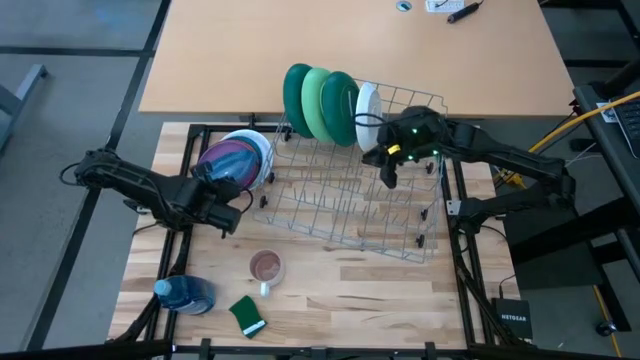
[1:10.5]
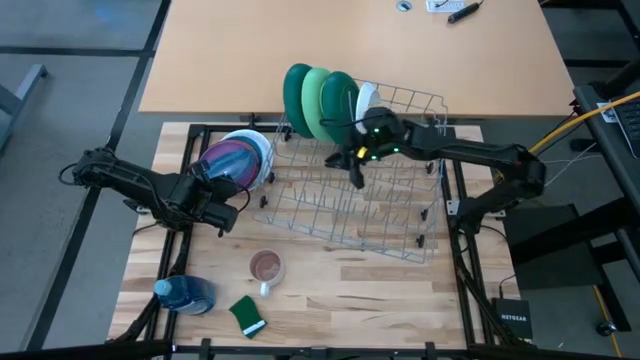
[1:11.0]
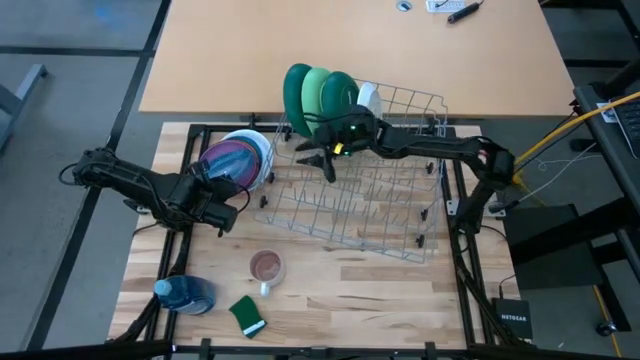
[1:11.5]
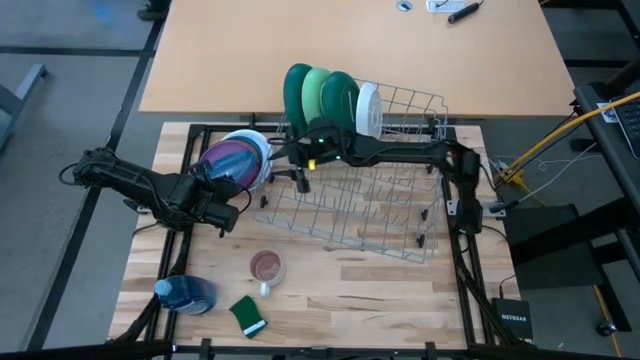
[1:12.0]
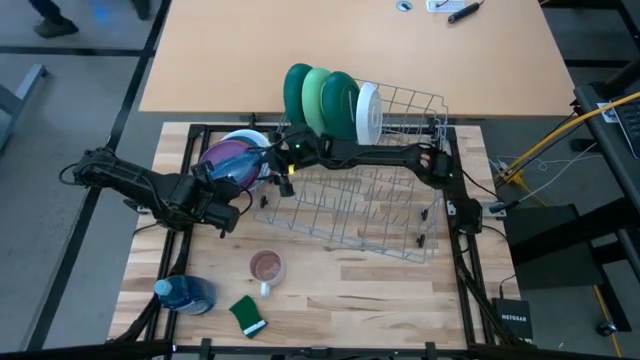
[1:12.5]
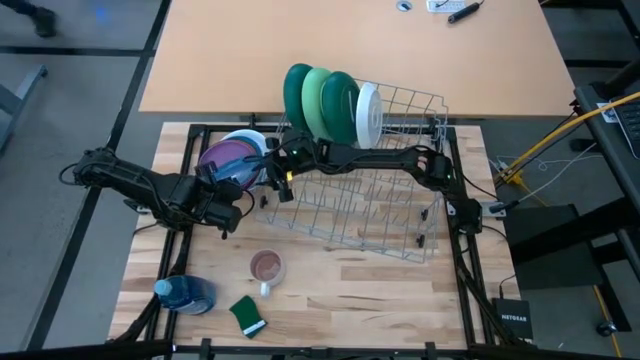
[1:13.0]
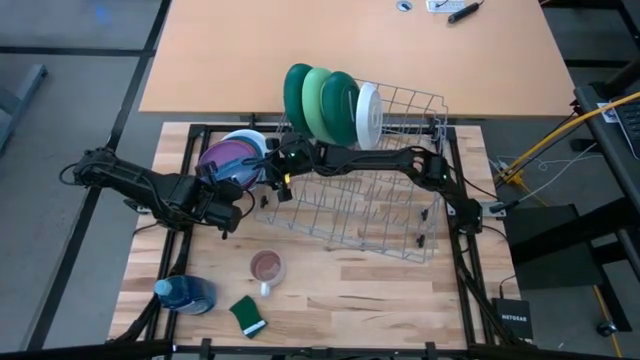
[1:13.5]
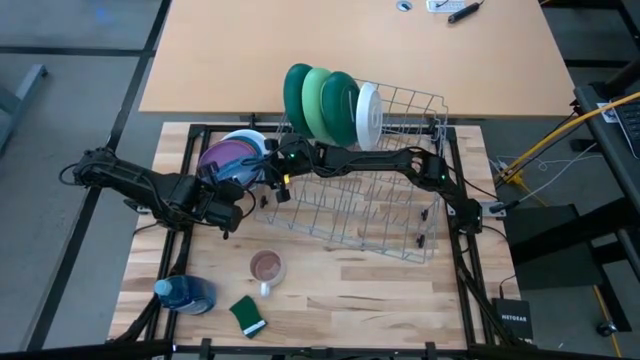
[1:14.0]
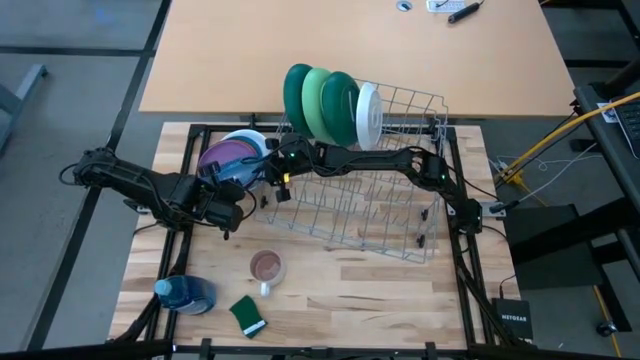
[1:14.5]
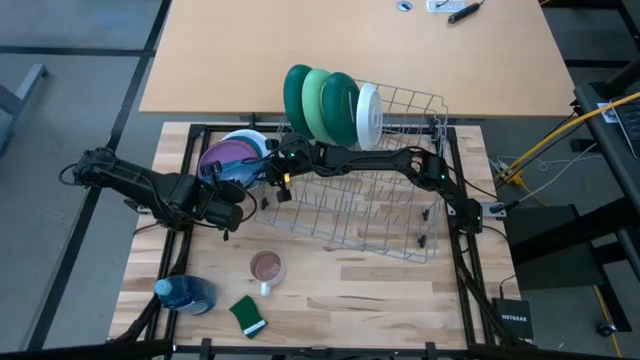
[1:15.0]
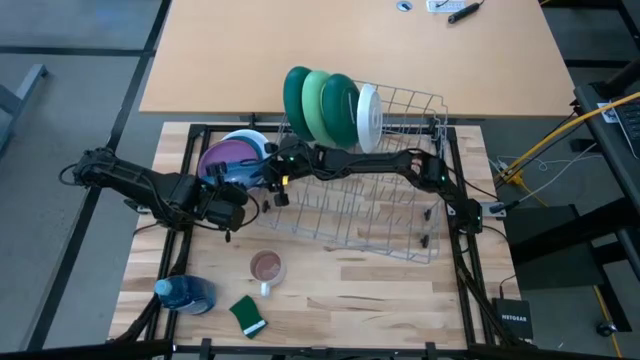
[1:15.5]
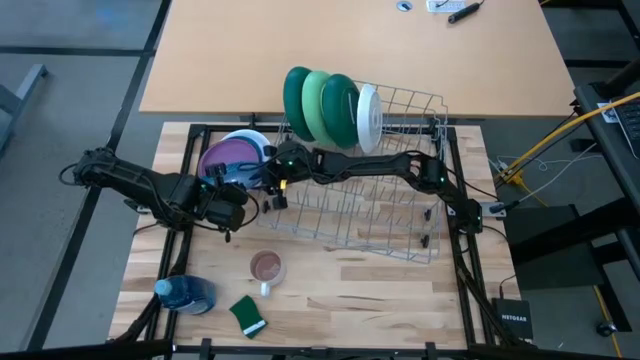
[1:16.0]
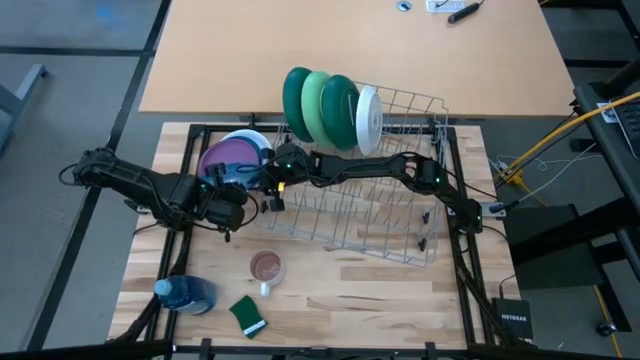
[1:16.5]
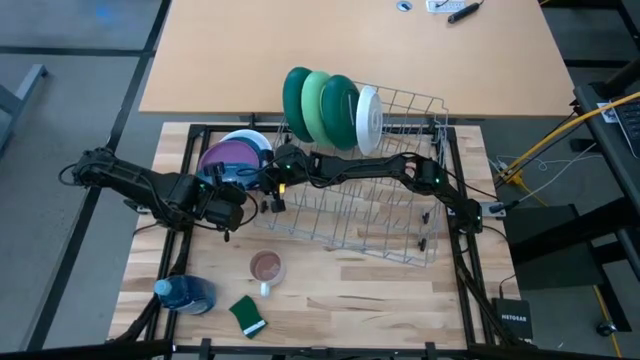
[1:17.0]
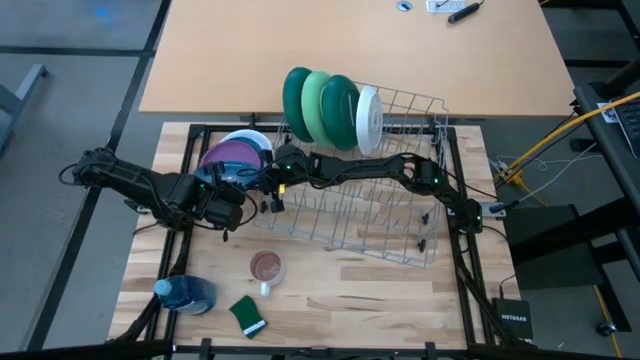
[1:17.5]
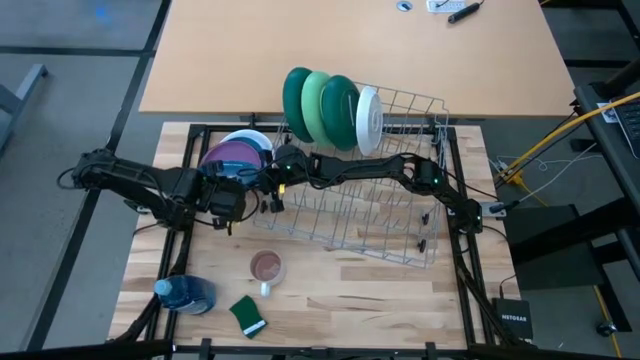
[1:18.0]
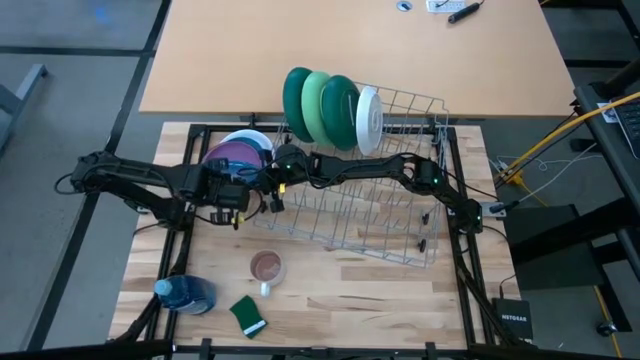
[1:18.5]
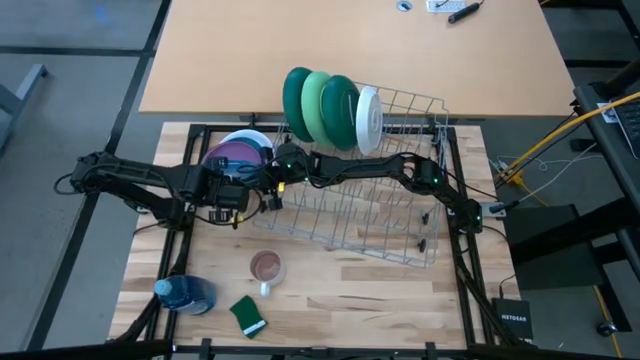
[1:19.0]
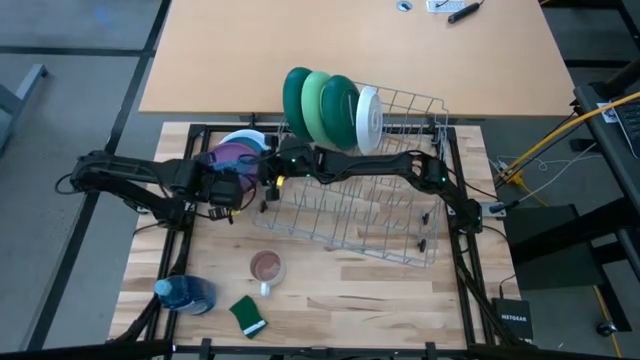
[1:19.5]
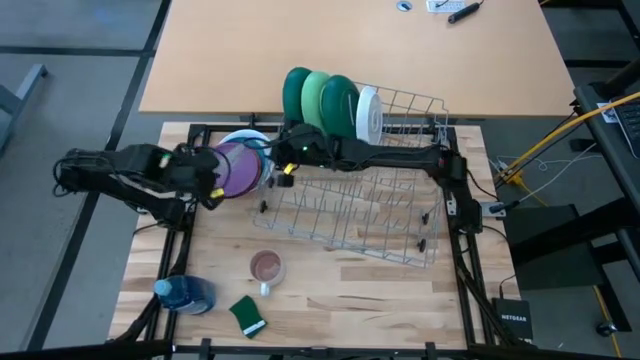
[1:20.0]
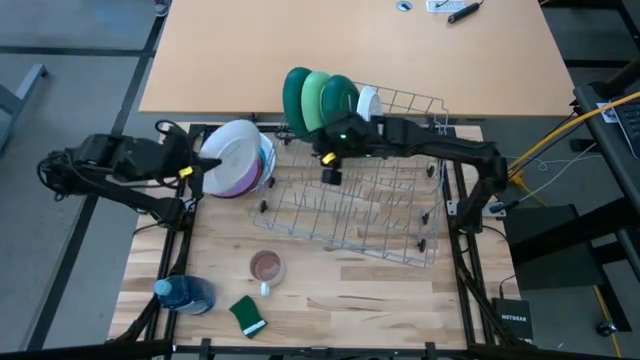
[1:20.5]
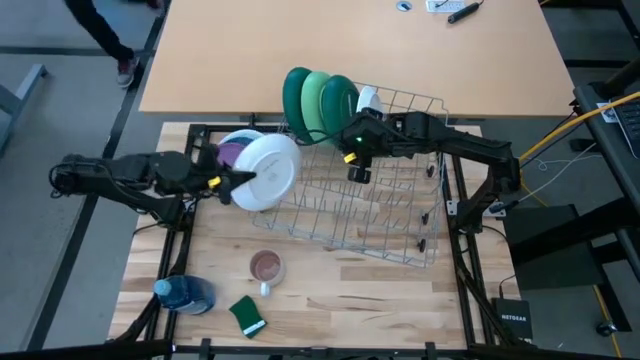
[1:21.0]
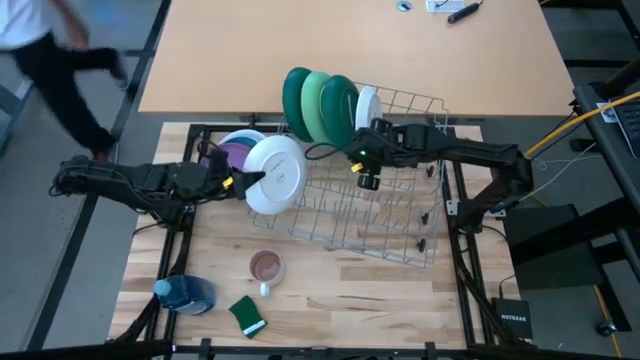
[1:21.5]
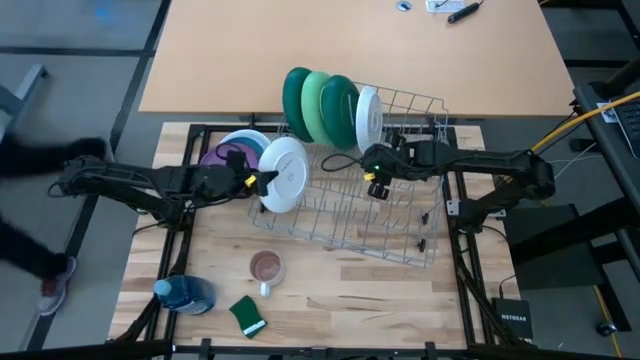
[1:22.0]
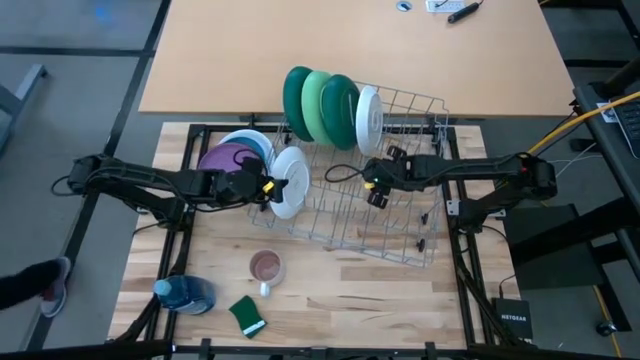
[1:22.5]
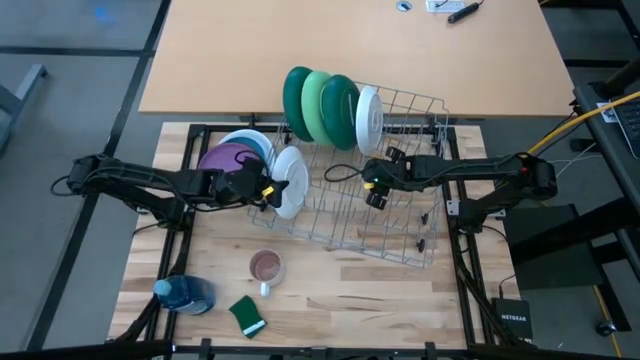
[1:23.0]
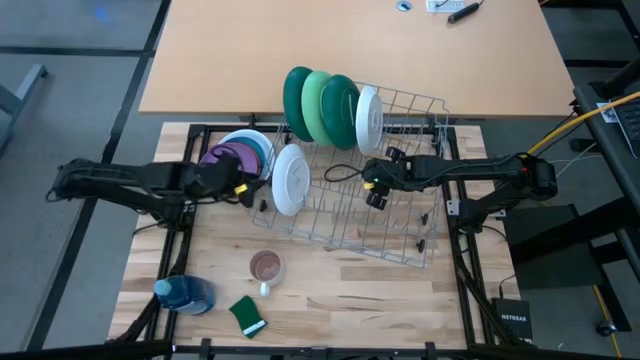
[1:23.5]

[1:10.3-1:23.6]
Task: Sort dishes
Put the blue plate into the dishwasher rack

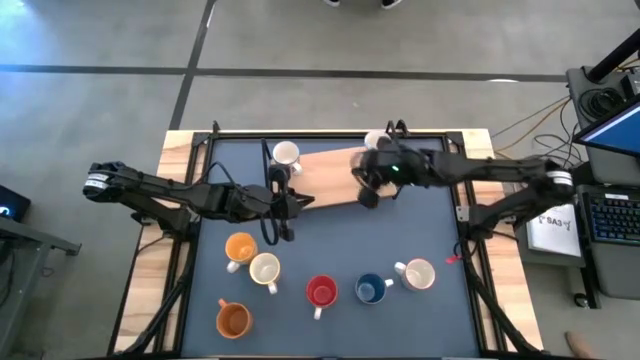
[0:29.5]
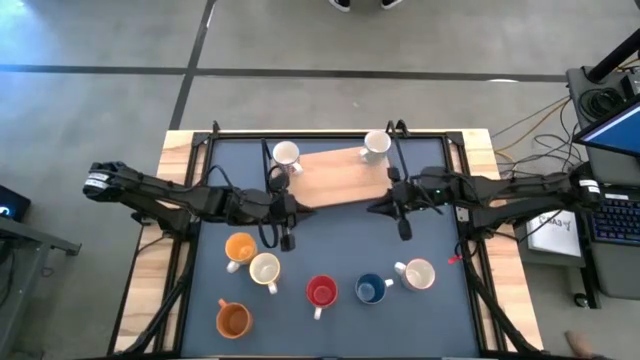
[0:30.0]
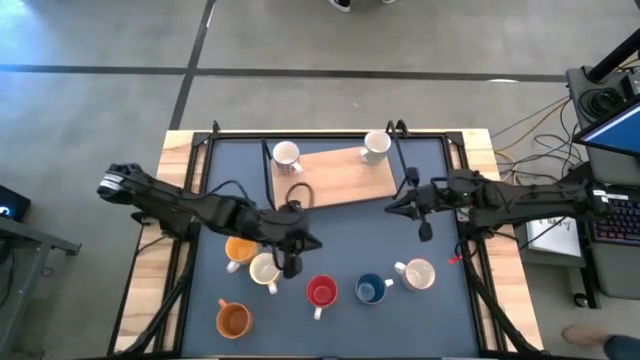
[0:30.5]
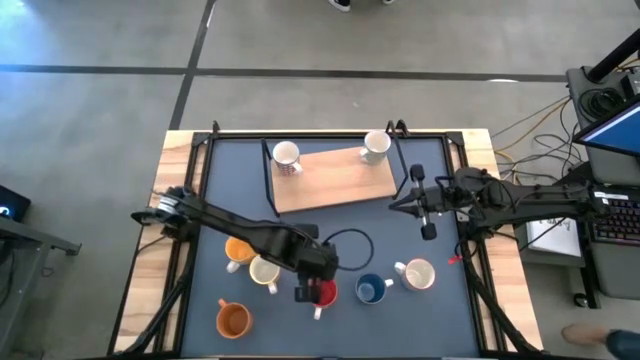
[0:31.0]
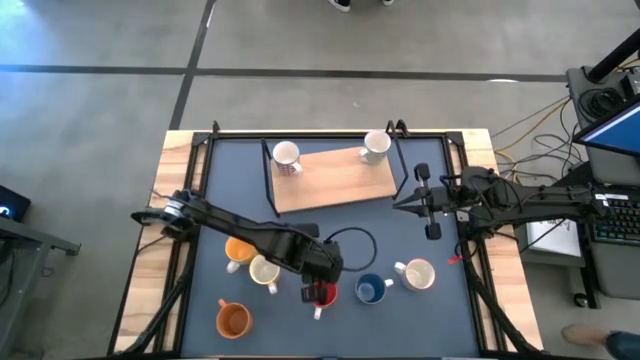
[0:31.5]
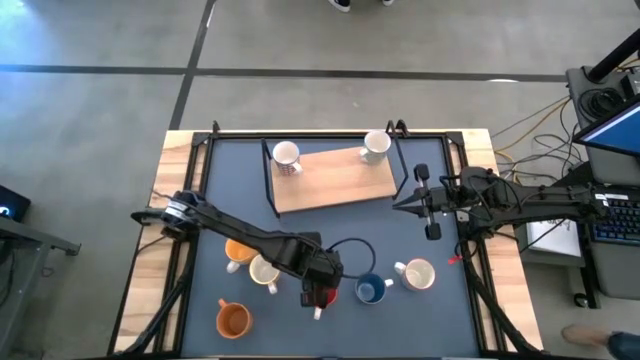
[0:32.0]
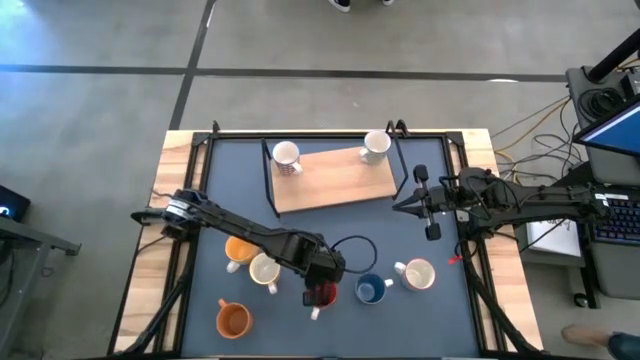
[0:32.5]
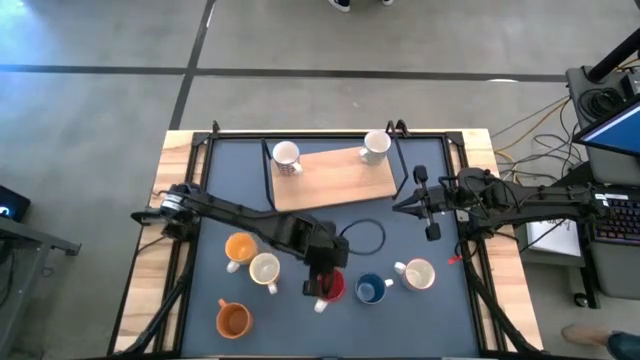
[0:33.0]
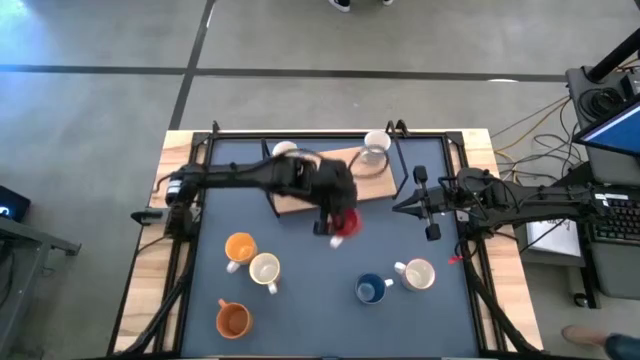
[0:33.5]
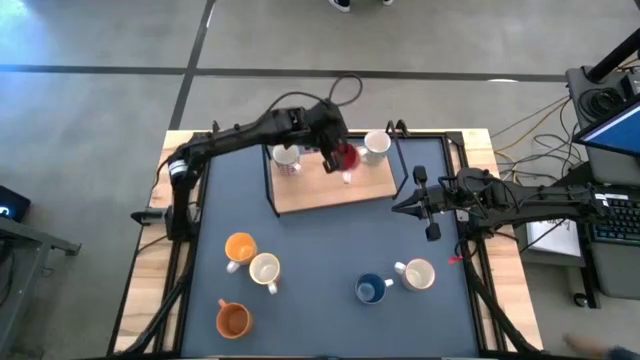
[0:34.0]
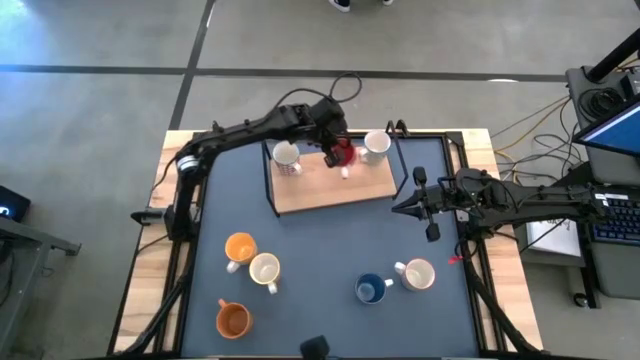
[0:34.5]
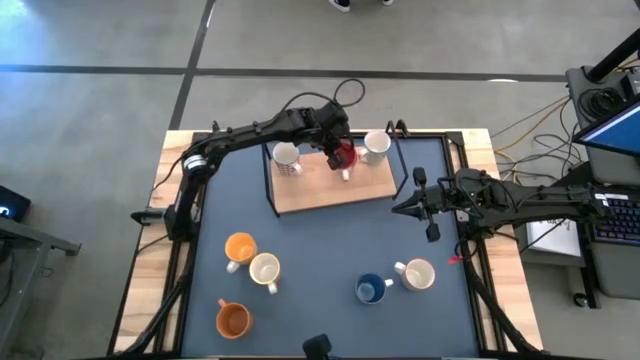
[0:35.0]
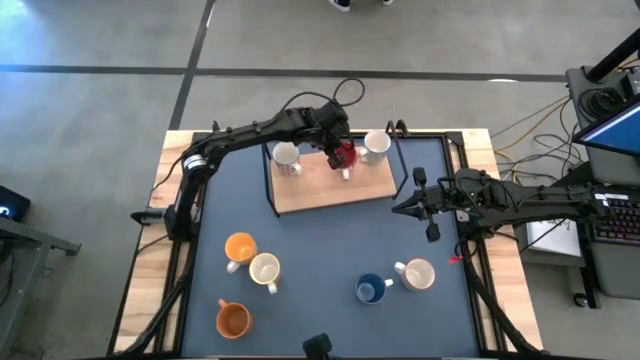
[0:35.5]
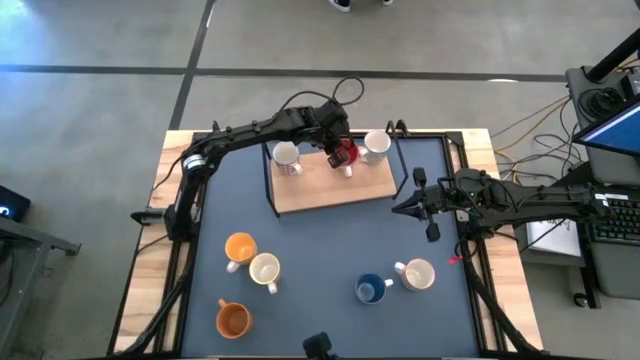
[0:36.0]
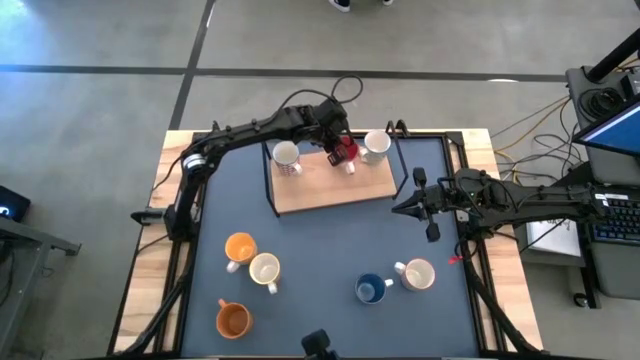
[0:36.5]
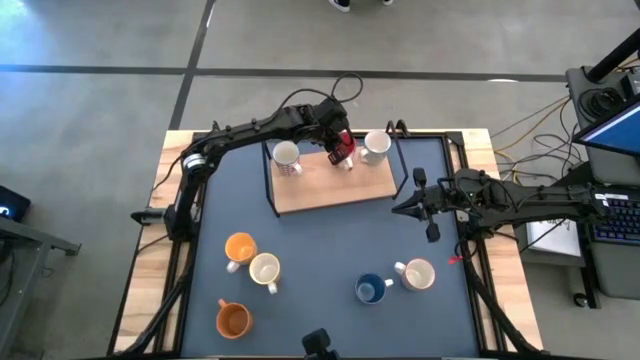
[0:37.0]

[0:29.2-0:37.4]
Task: Place coffee mugs
Put the red mug on the shelf
